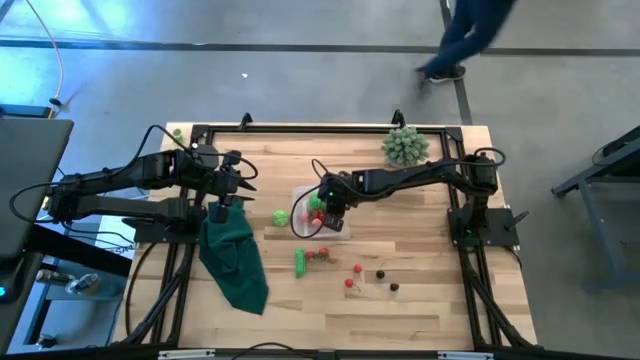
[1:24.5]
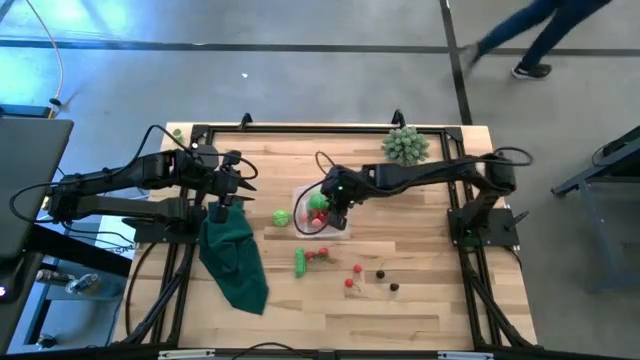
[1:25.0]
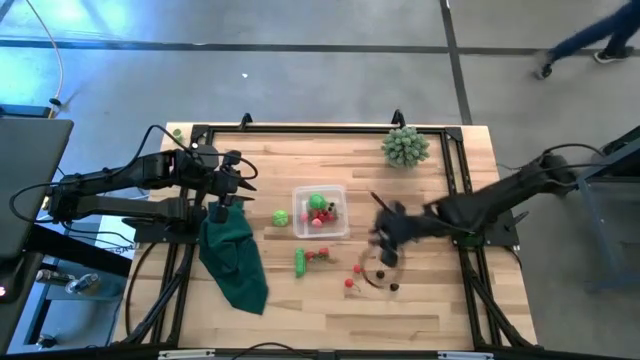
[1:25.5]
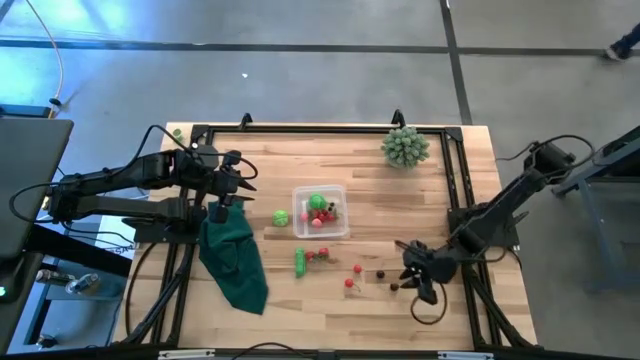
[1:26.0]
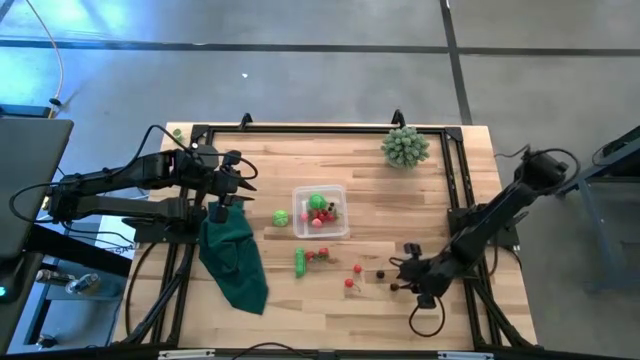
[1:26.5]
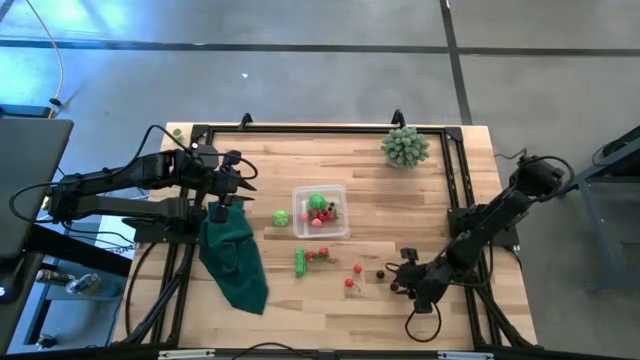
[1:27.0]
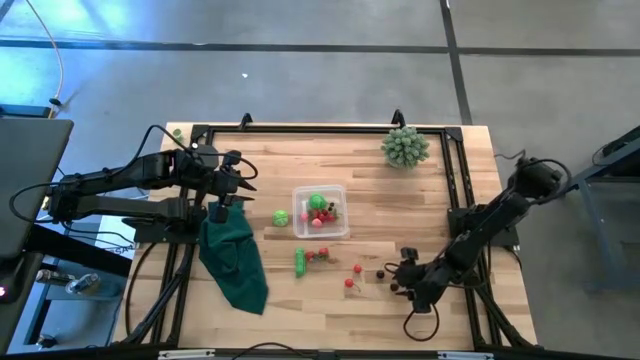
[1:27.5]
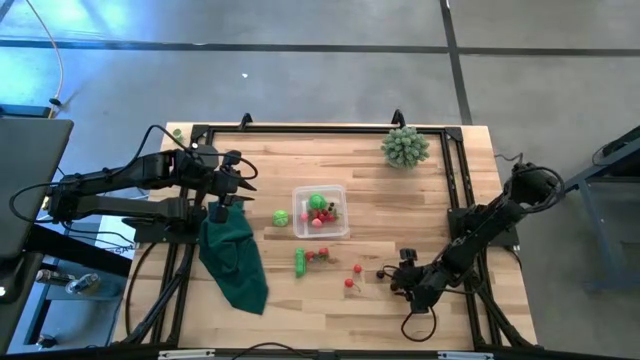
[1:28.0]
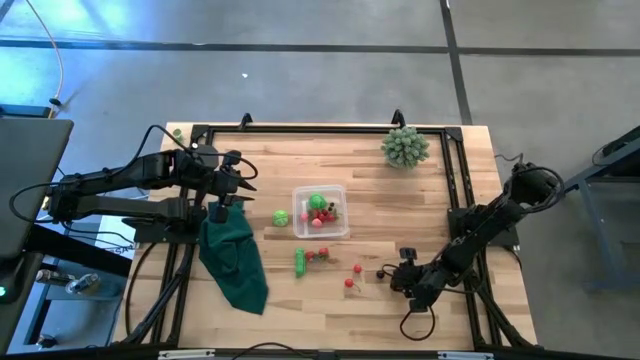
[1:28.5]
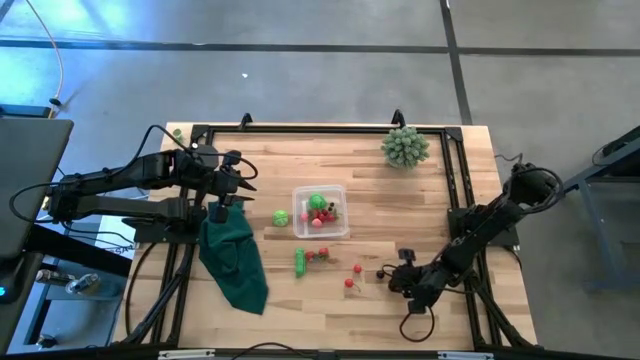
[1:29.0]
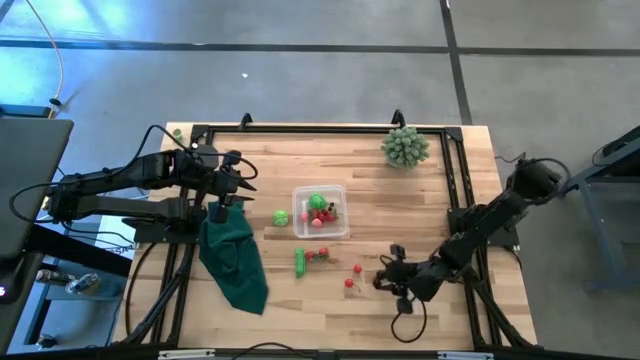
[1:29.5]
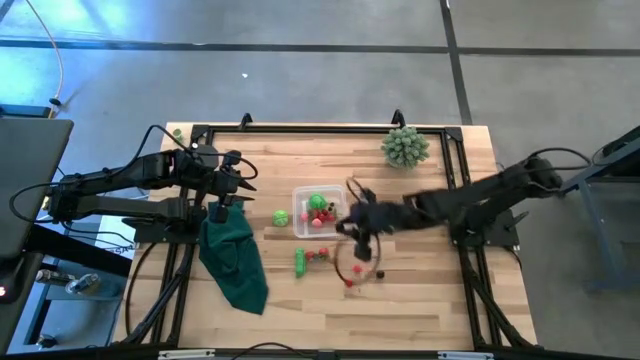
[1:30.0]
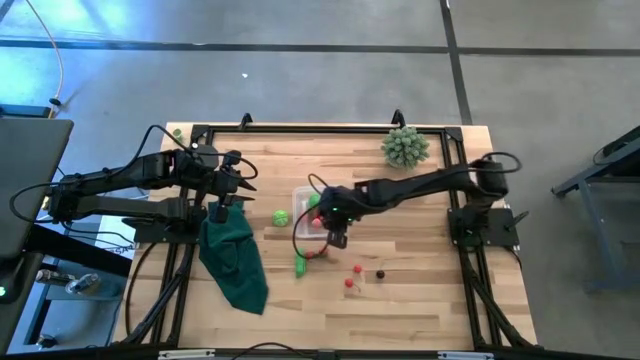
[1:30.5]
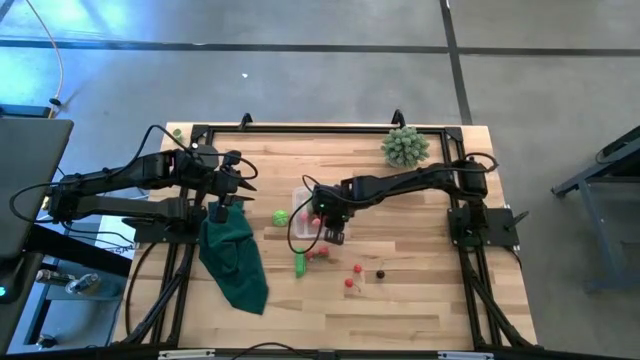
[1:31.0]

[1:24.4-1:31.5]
Task: Pick and placing Produce into tupperware
Put the blackberry into the transparent bin

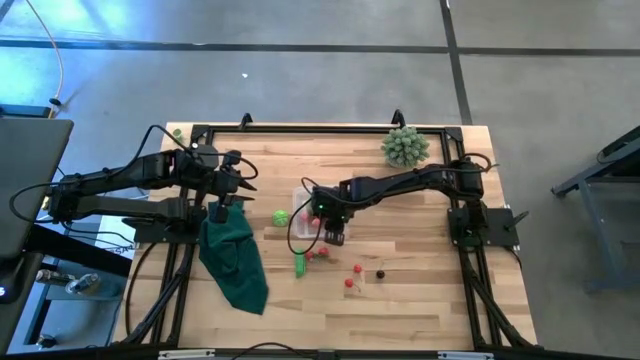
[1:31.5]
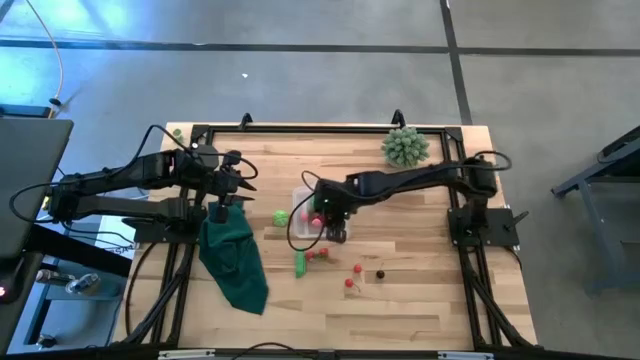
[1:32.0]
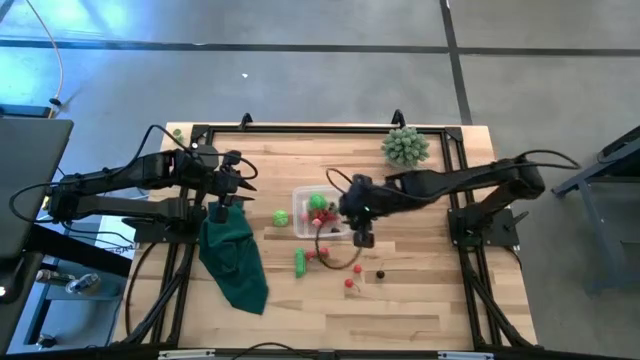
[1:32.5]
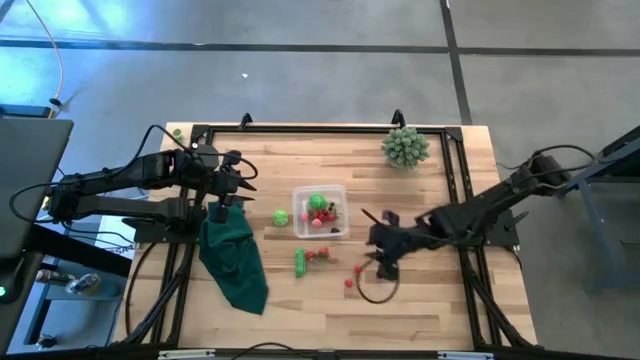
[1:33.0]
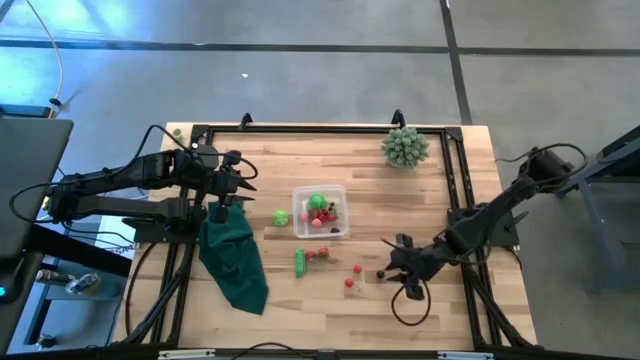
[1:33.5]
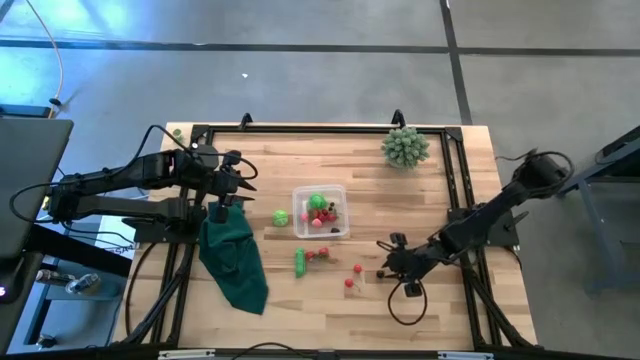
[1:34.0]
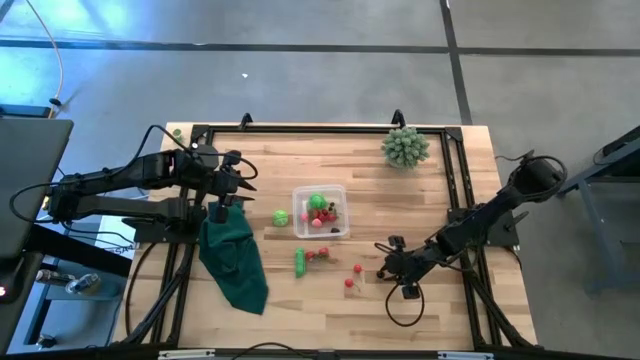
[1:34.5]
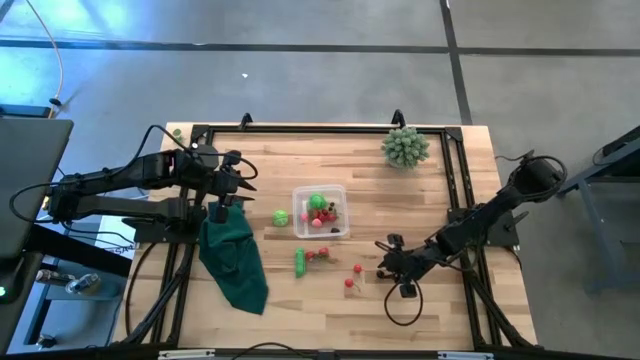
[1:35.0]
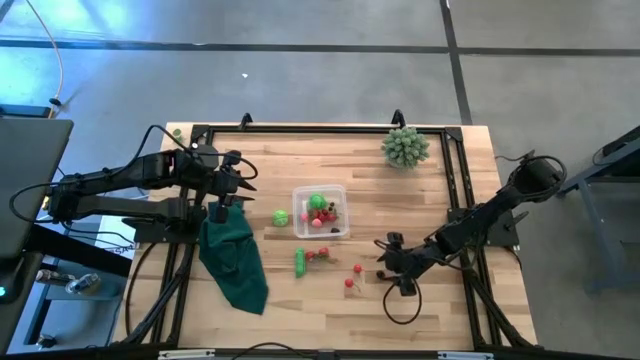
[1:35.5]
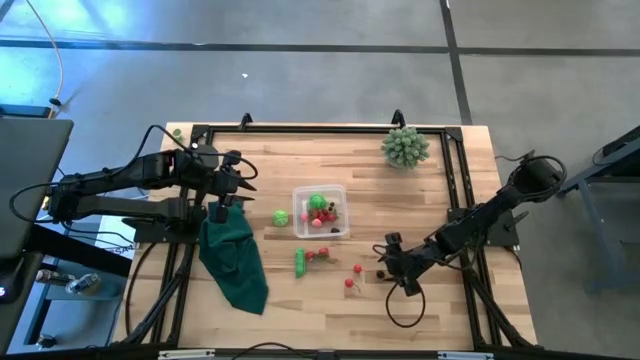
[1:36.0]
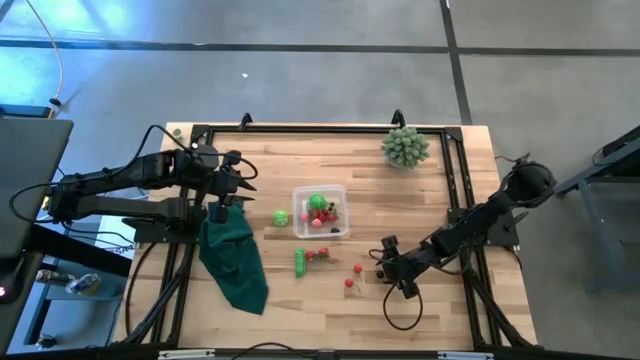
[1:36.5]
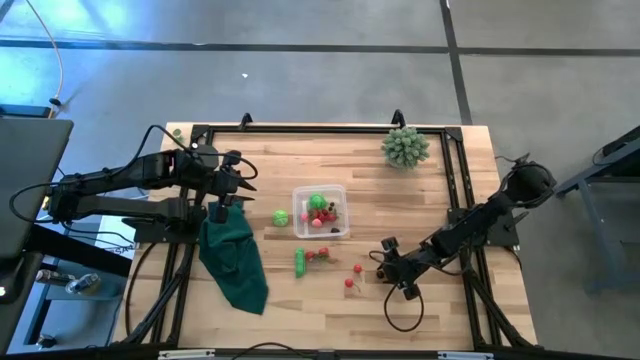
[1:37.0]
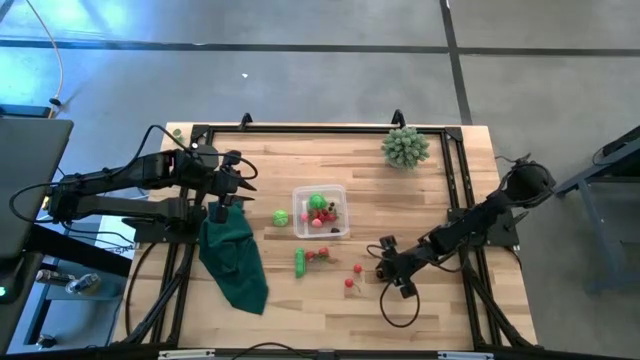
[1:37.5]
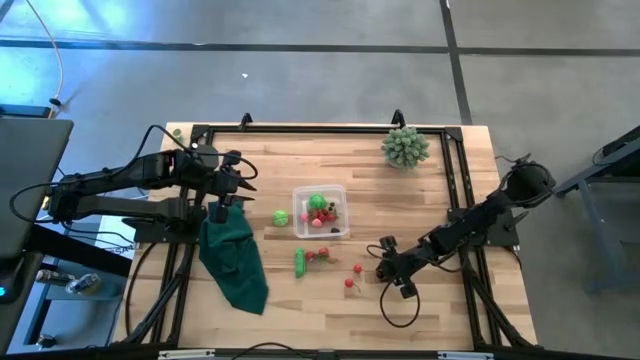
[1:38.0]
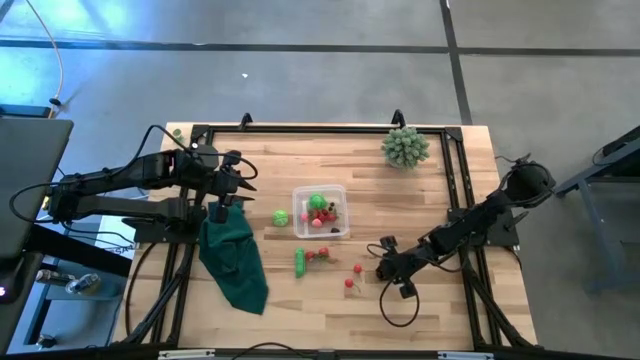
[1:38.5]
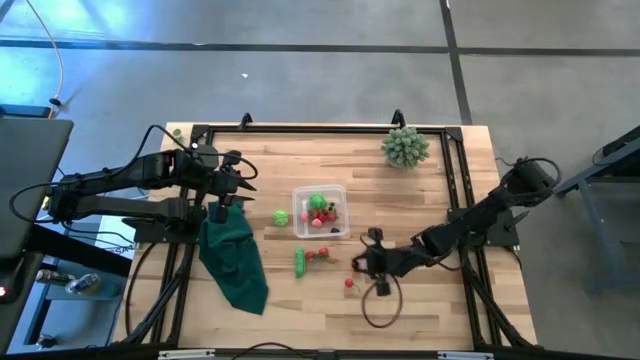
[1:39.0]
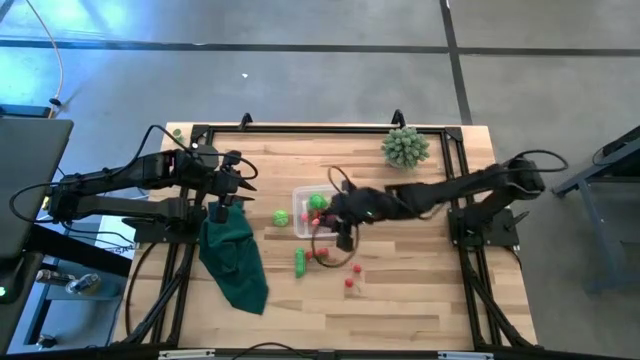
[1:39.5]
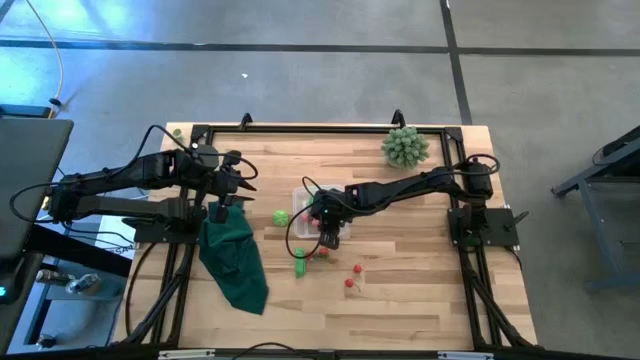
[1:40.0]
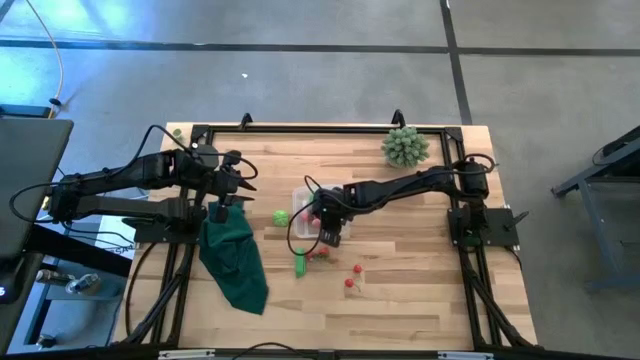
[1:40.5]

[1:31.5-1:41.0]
Put the black cherry into the transparent bin

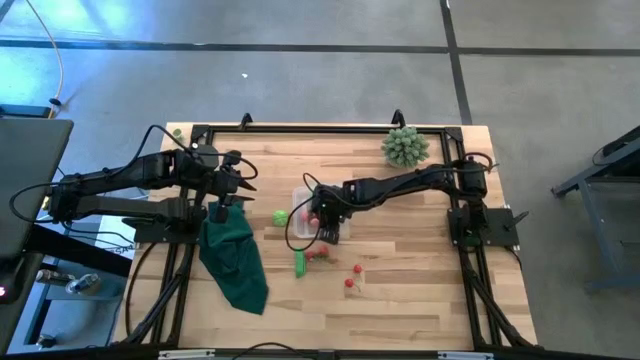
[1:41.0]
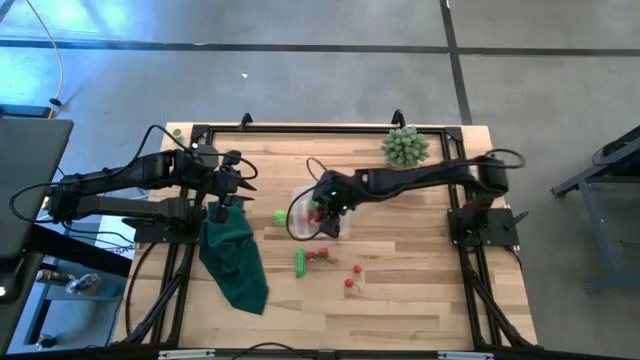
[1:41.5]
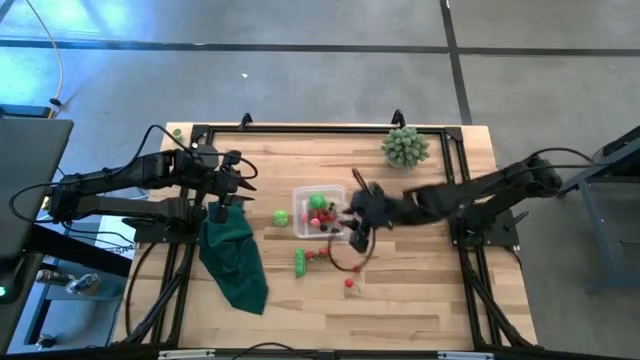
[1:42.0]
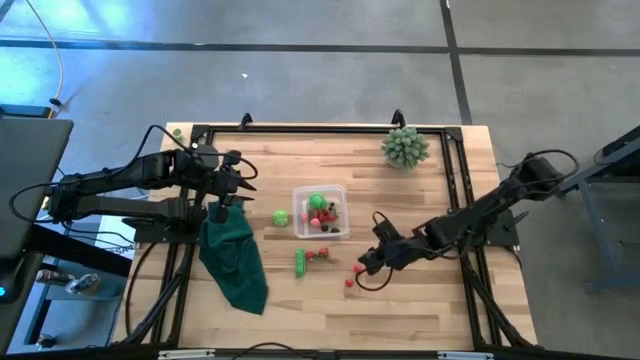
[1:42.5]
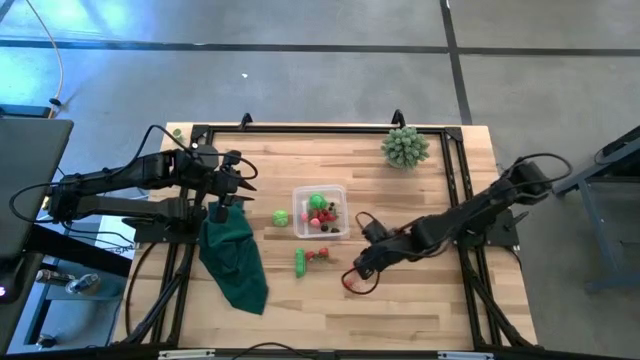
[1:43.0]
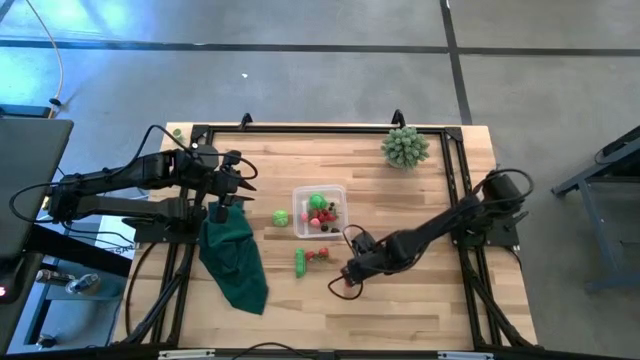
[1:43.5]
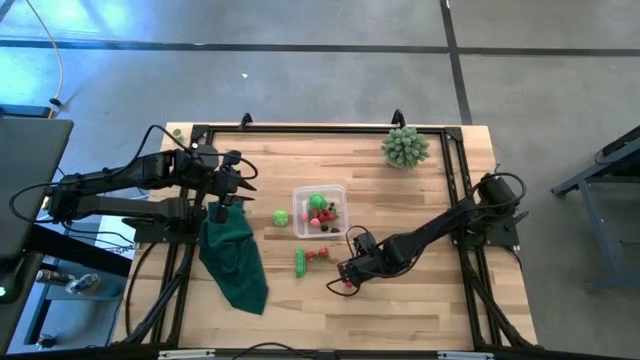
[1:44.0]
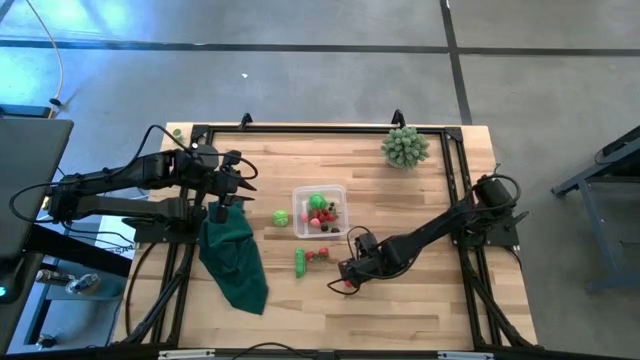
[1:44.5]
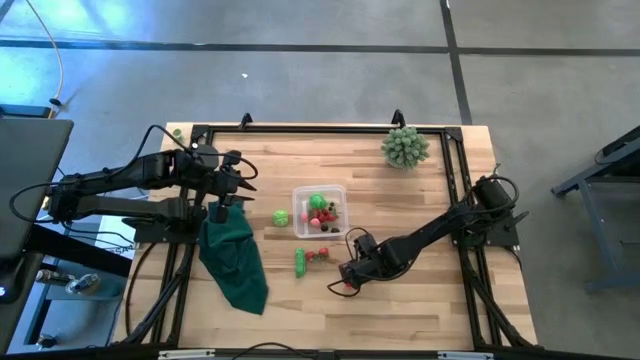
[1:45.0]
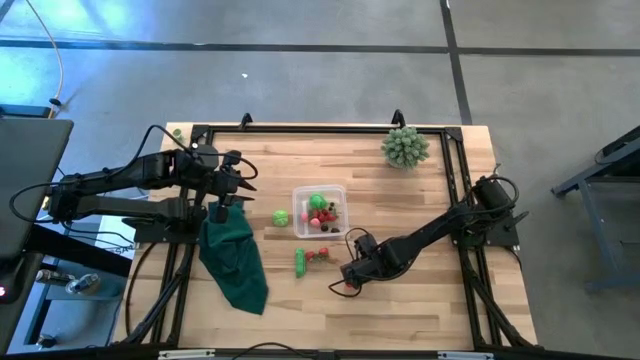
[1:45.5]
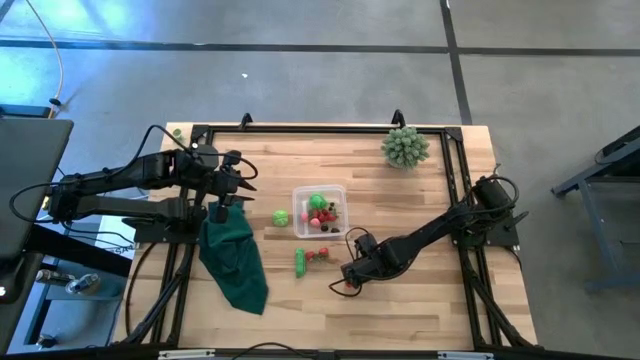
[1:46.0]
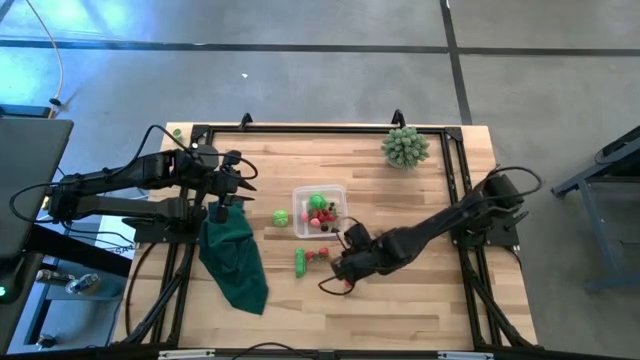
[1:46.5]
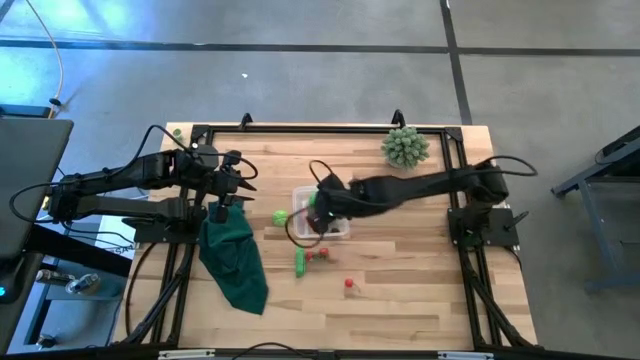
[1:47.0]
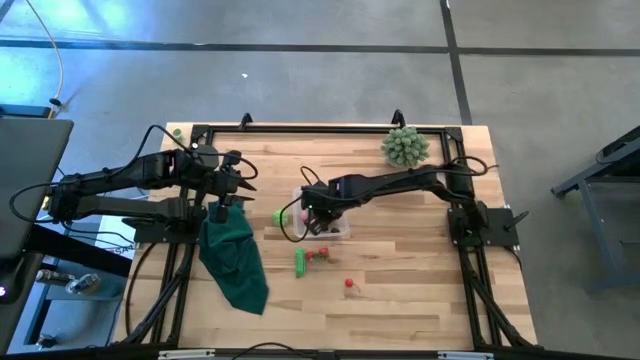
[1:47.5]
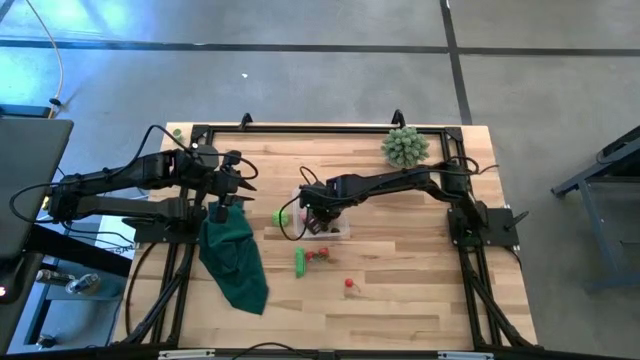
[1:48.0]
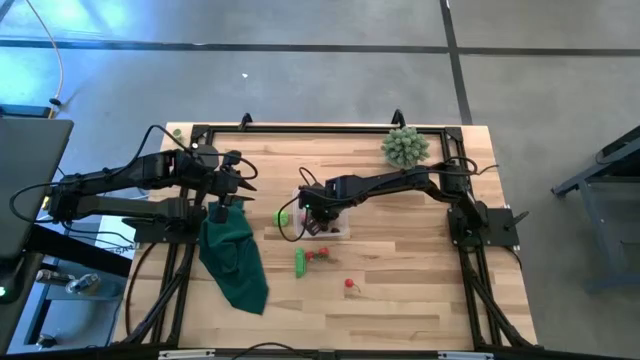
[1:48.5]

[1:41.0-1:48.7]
Put the red cherry into the transparent bin
